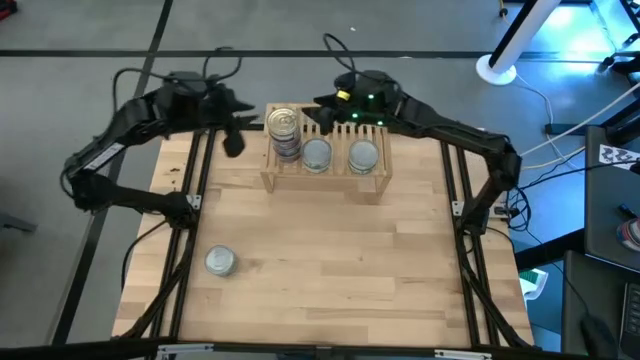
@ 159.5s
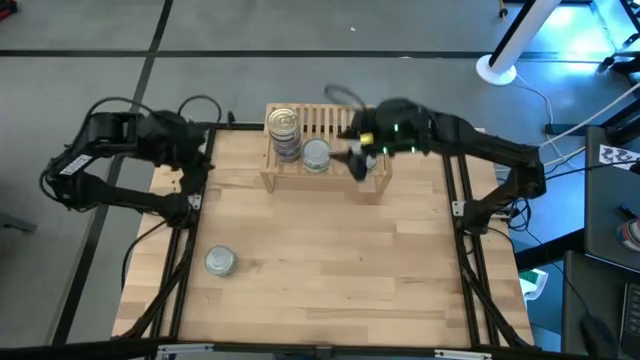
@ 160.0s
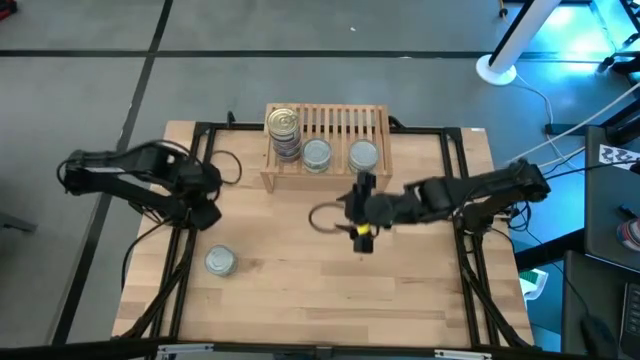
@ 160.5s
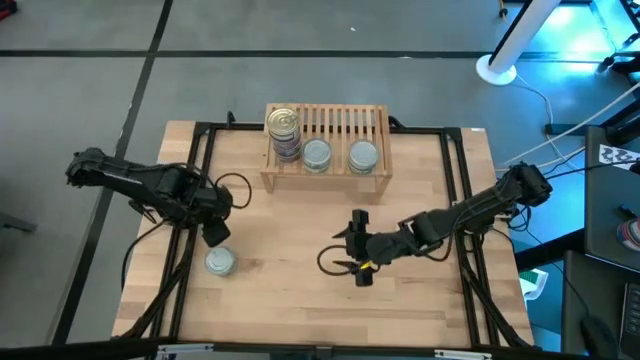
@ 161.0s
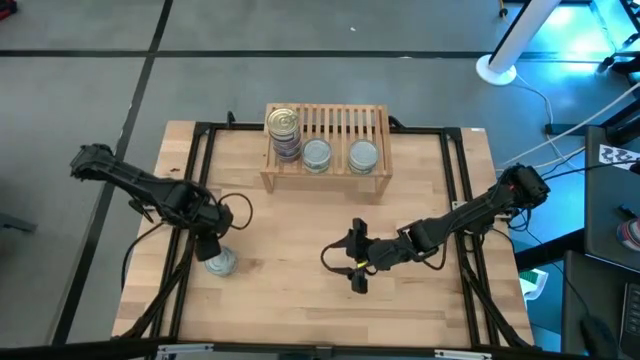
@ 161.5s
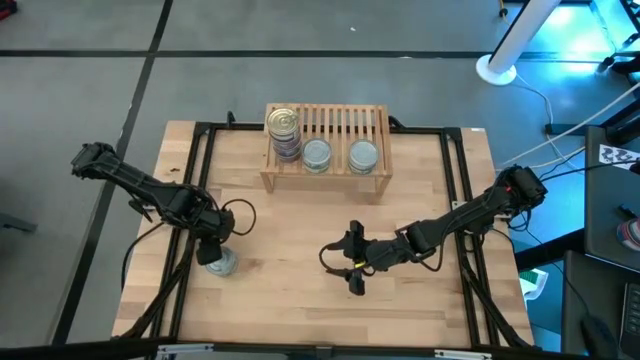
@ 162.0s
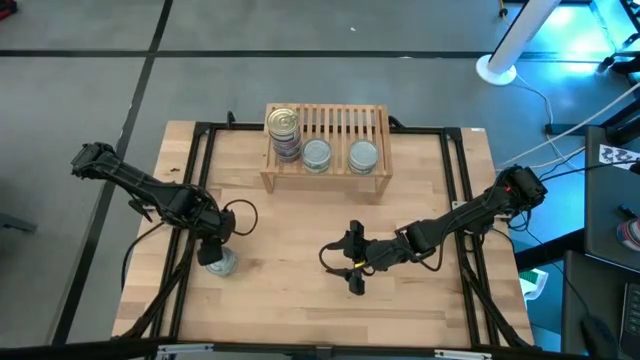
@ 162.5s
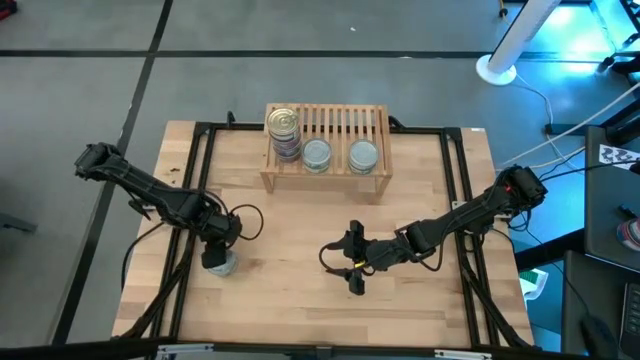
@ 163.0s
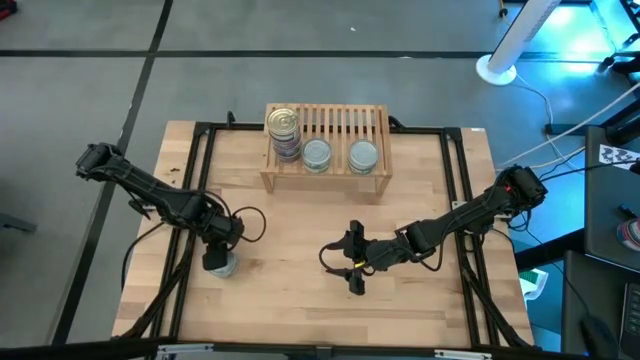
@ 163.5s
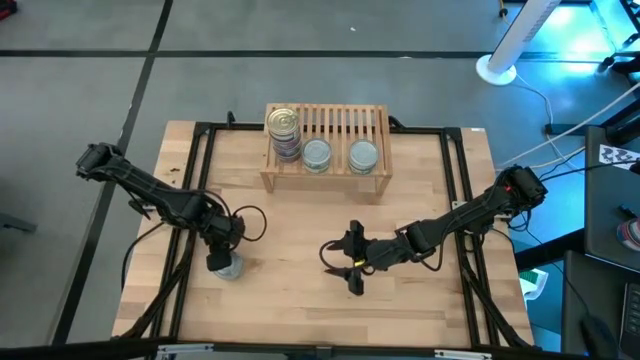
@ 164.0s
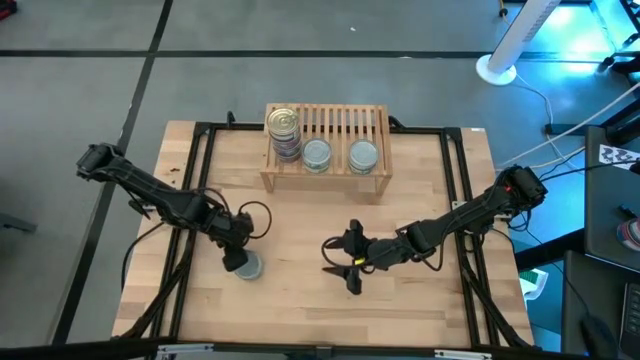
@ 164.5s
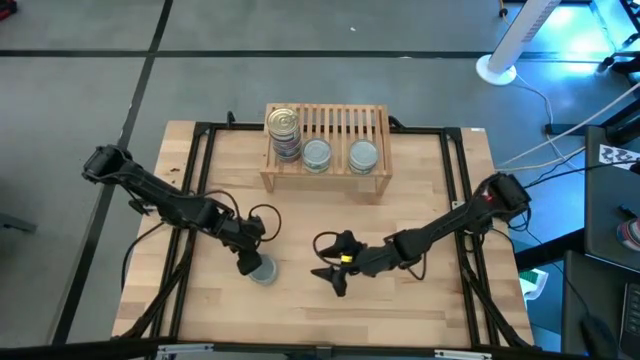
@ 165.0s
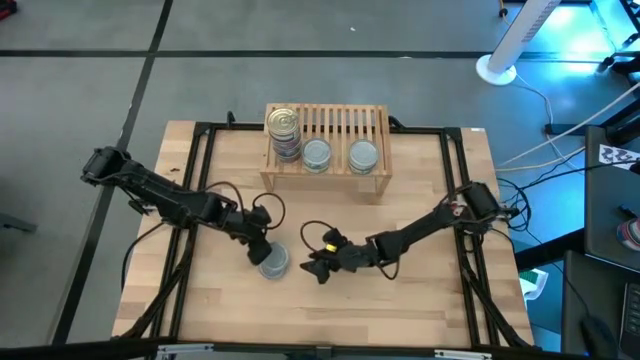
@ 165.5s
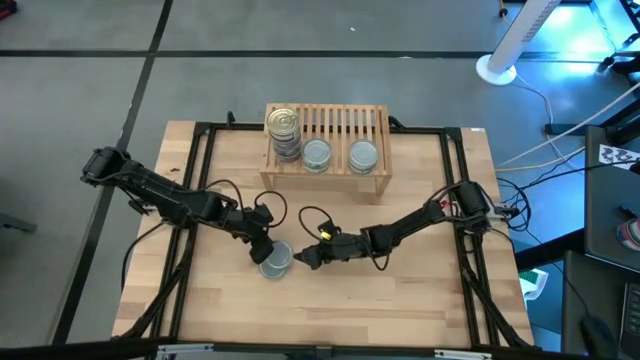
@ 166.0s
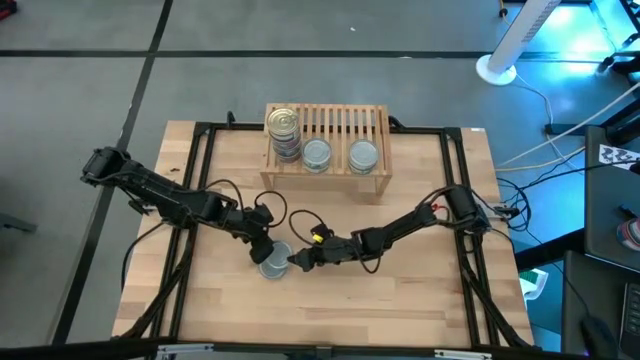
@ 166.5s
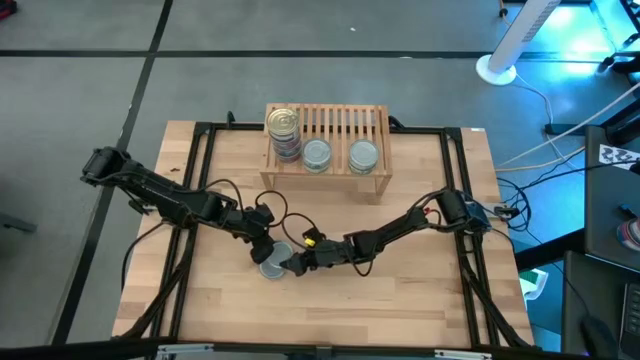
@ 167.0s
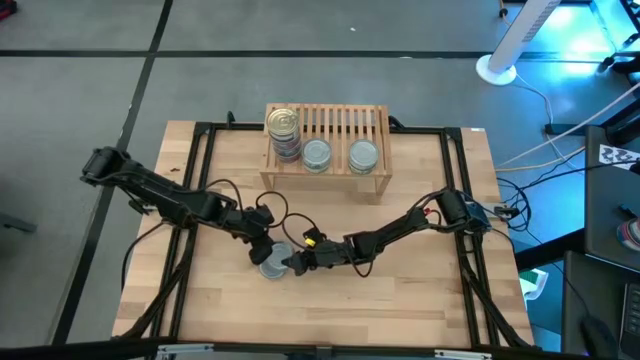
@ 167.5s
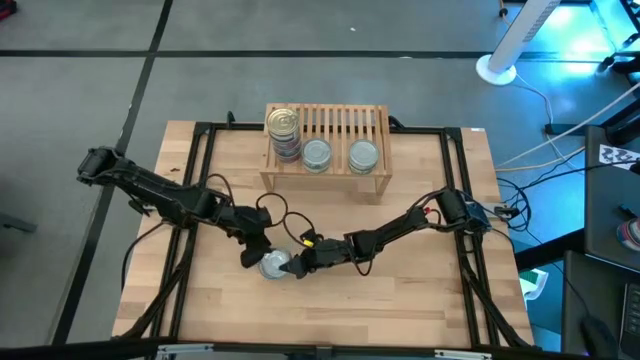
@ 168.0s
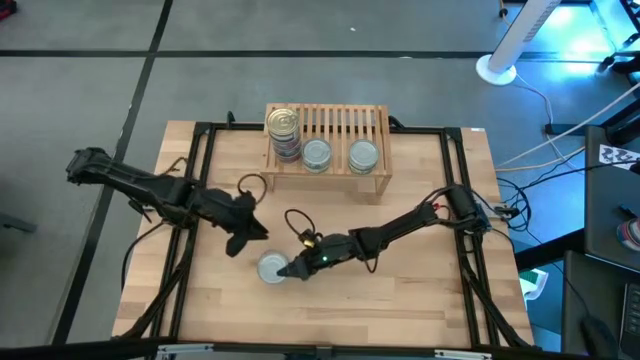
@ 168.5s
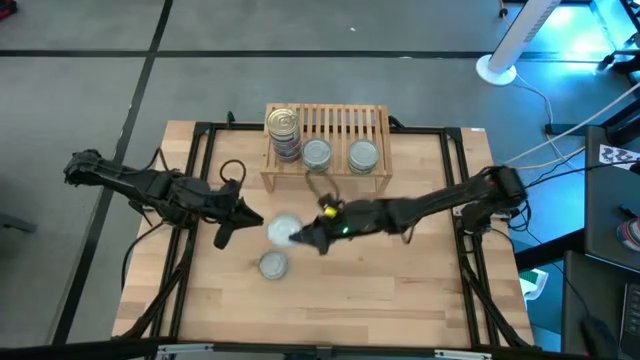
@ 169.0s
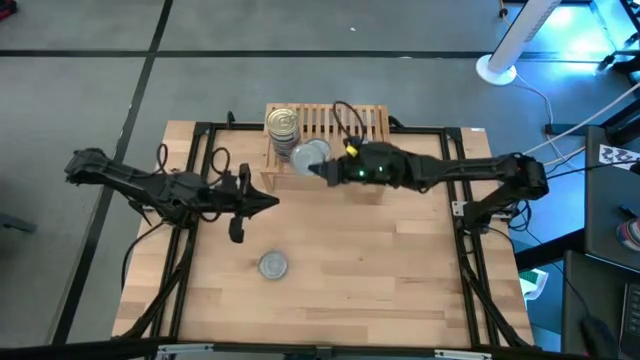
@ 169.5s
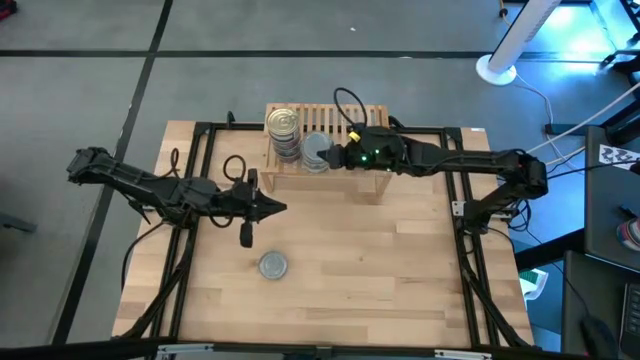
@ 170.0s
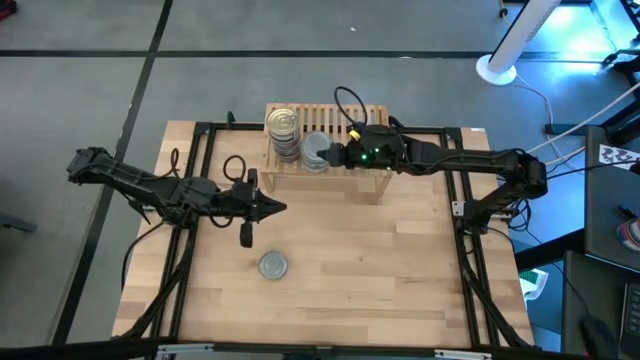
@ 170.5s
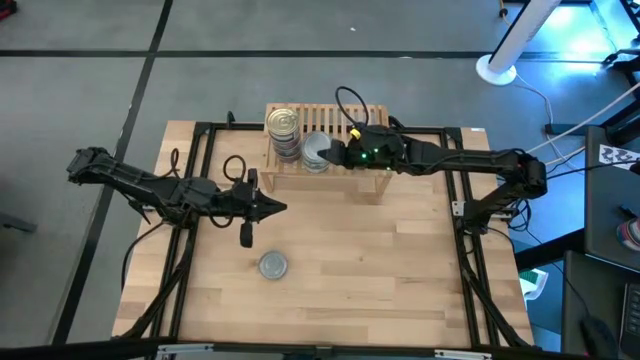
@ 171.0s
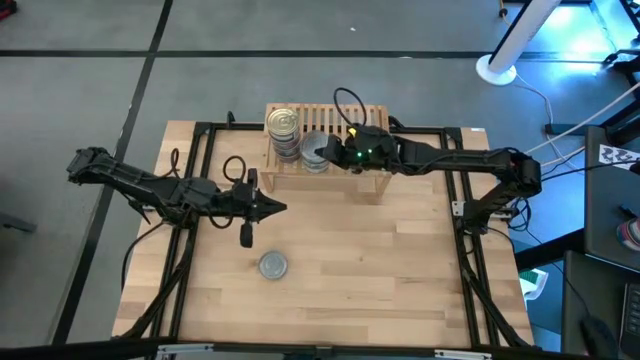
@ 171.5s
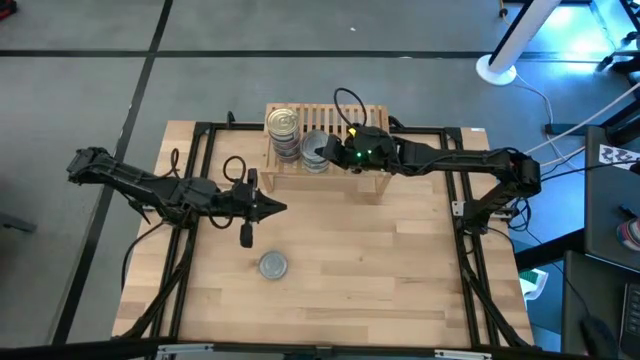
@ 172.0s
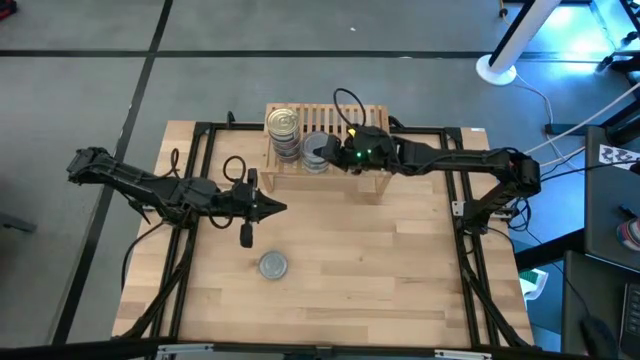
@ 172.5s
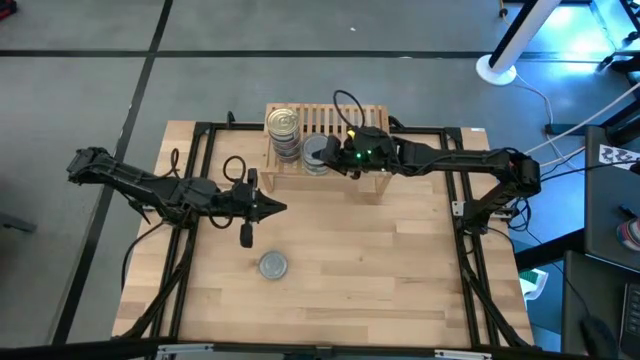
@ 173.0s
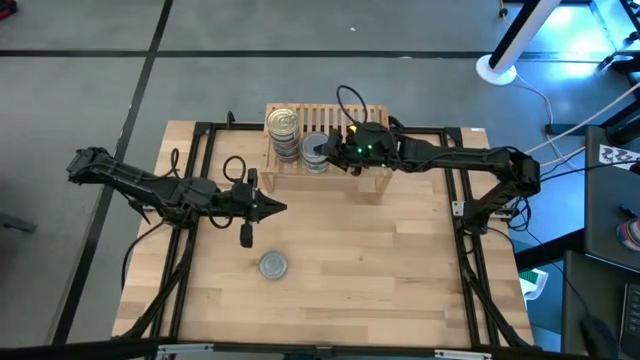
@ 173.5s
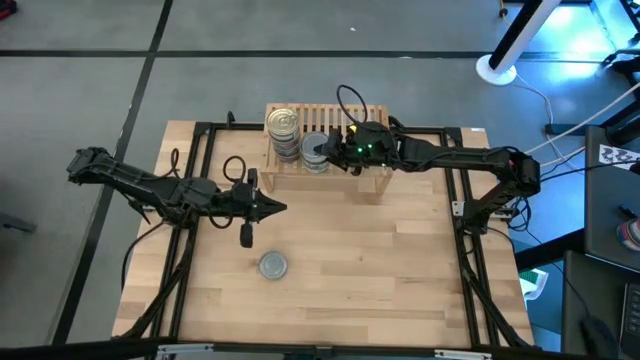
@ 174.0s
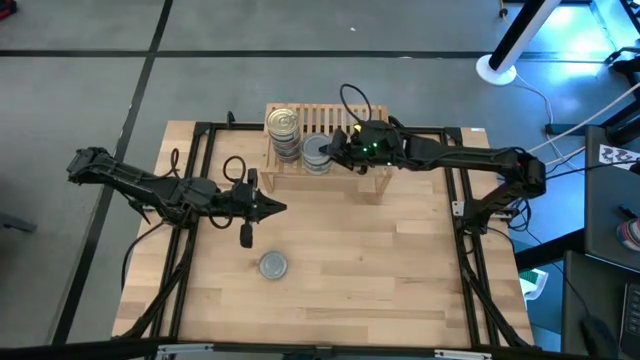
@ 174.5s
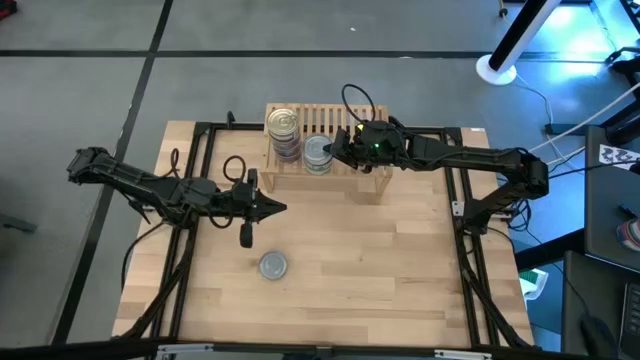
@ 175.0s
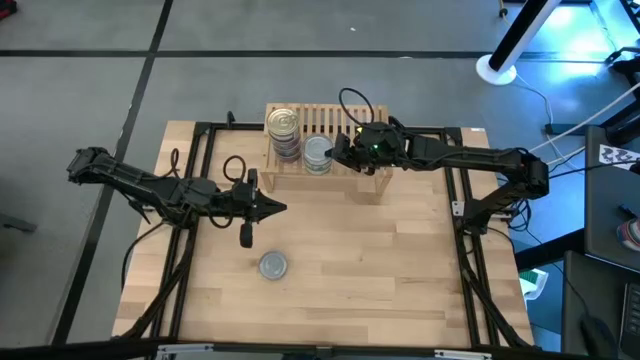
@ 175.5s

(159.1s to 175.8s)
Task: Stack canned seafood by type on shelf
Stack the green tuna can on top of the other green tuna can on the shelf

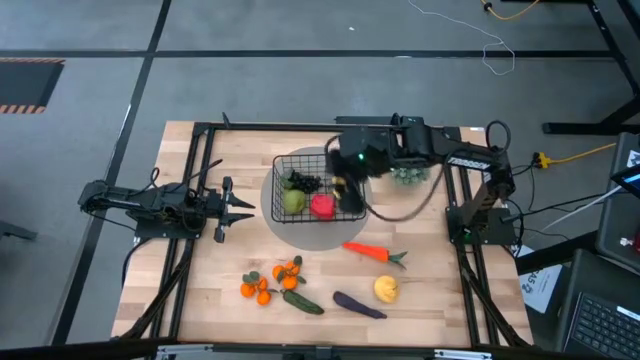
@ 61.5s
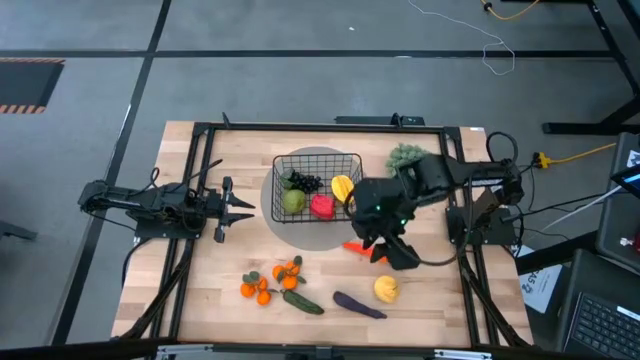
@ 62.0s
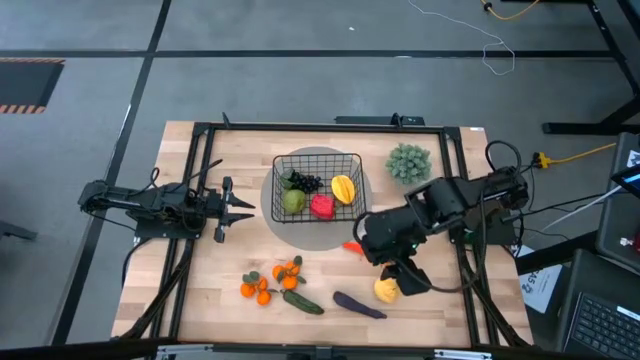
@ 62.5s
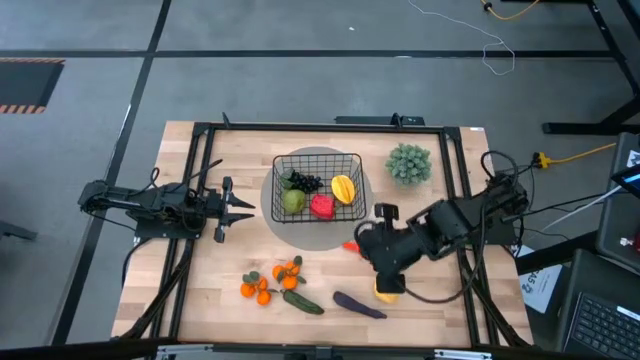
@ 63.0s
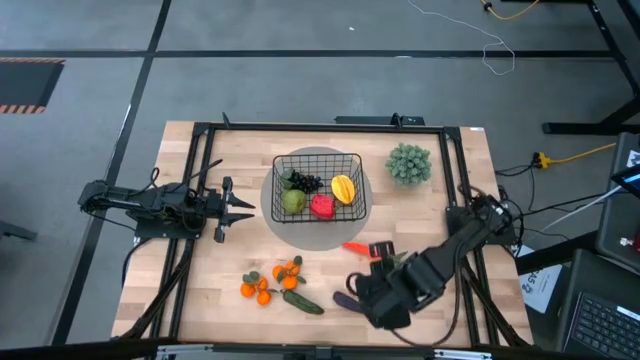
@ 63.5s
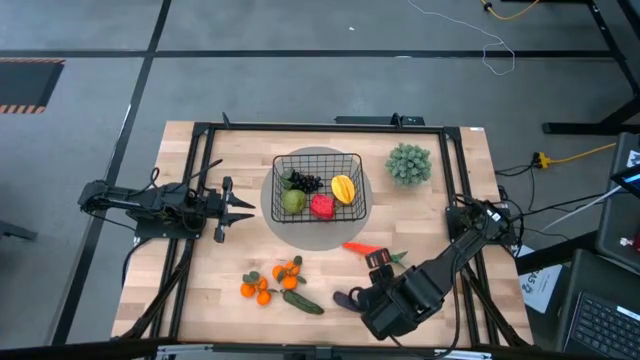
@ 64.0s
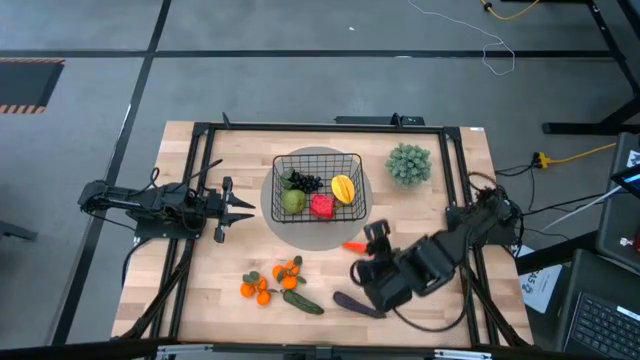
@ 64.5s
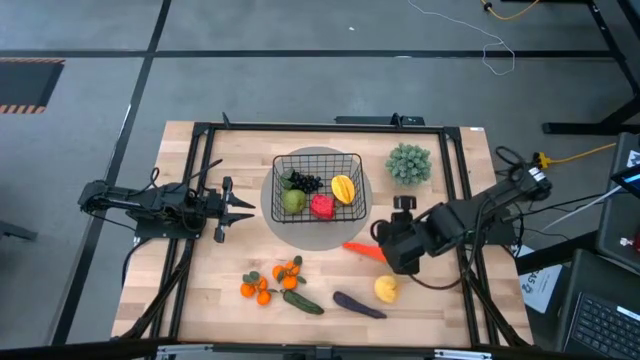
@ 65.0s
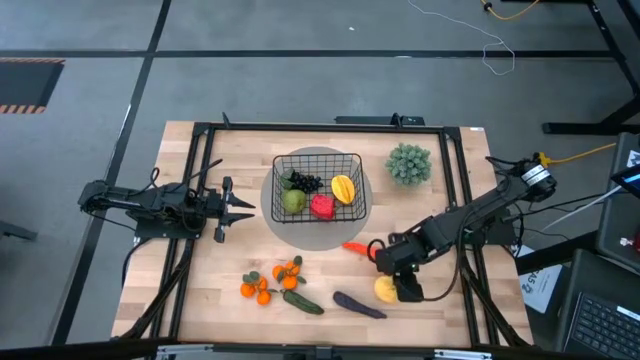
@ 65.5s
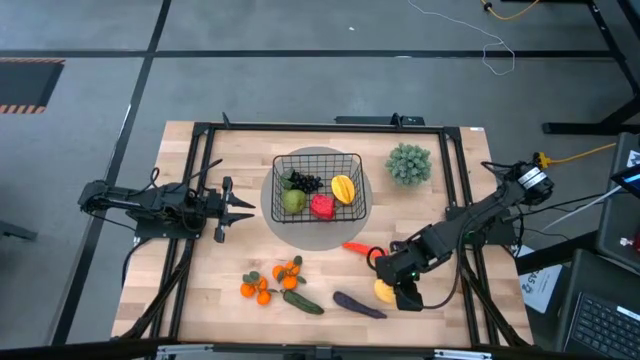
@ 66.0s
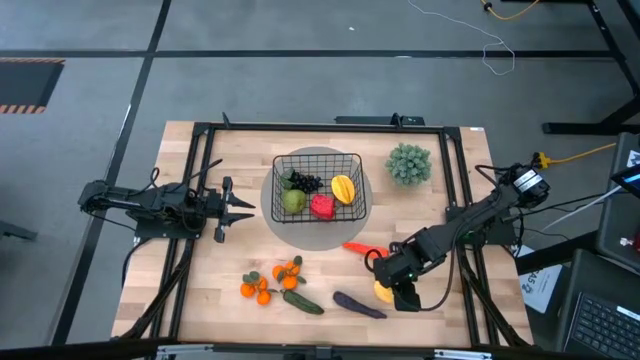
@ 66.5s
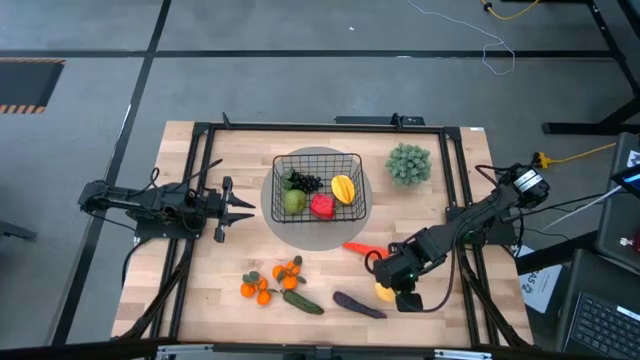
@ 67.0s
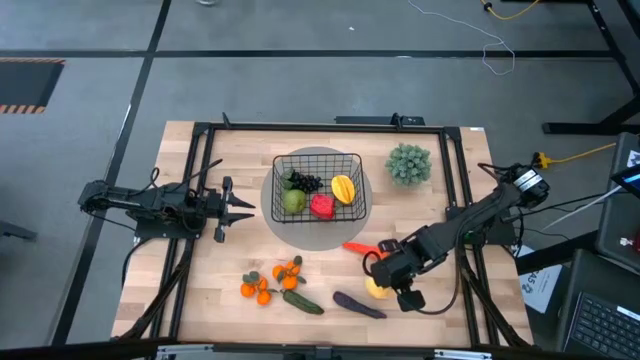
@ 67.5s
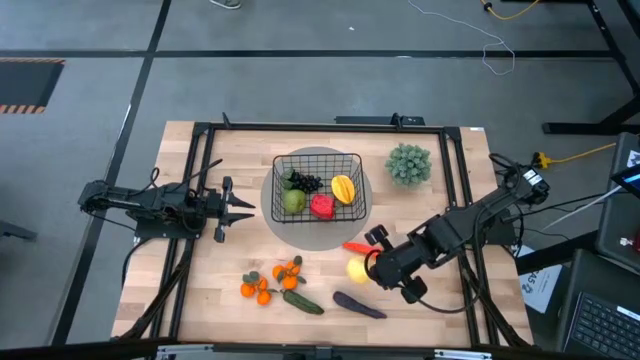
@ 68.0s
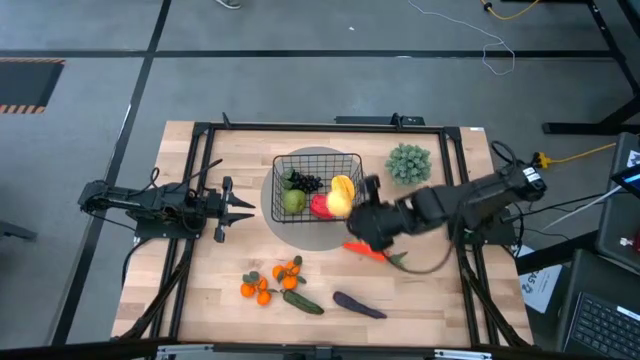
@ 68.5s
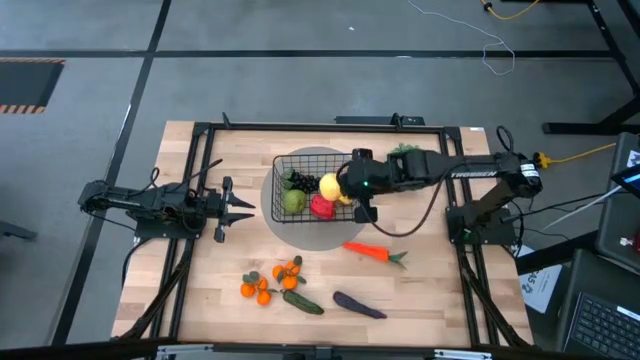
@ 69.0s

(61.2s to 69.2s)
Task: Build produce basket
Put the yellow pear into the black wire basket
